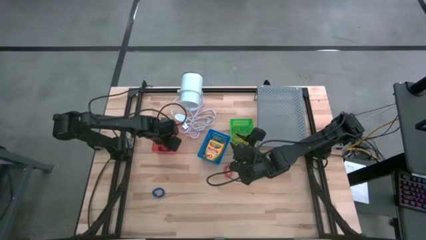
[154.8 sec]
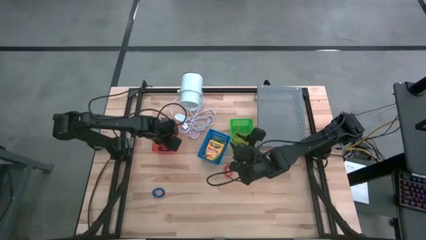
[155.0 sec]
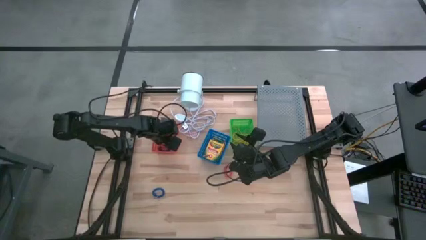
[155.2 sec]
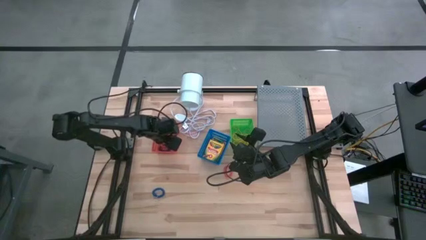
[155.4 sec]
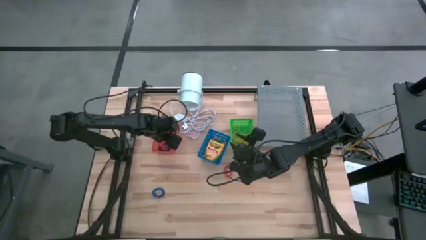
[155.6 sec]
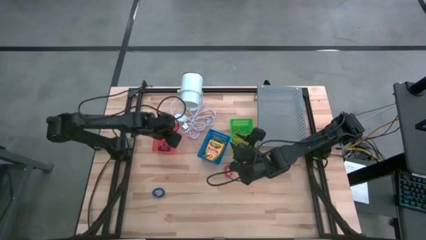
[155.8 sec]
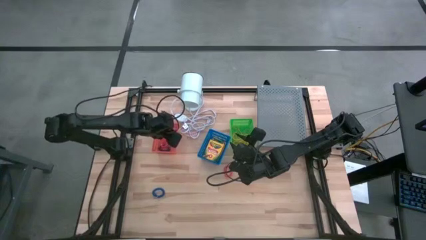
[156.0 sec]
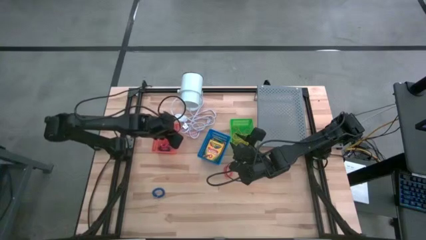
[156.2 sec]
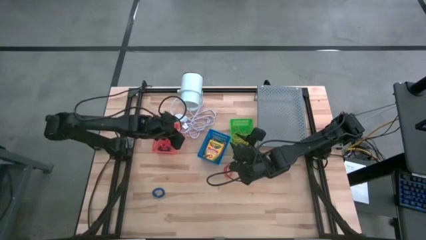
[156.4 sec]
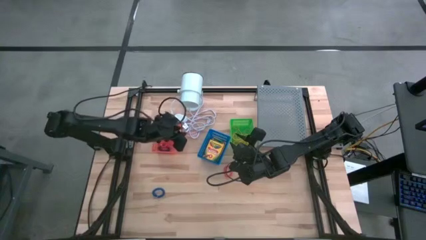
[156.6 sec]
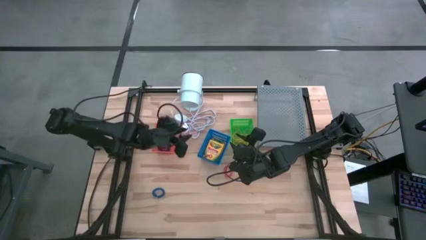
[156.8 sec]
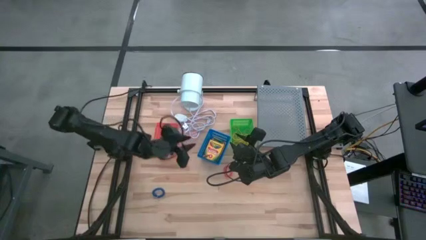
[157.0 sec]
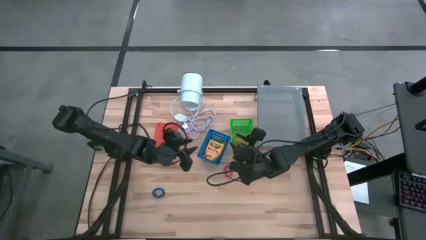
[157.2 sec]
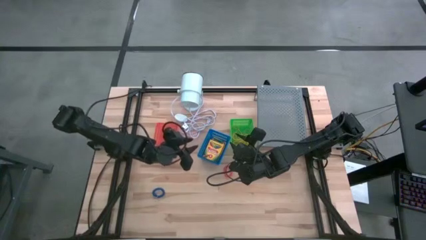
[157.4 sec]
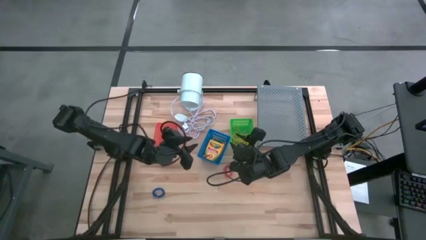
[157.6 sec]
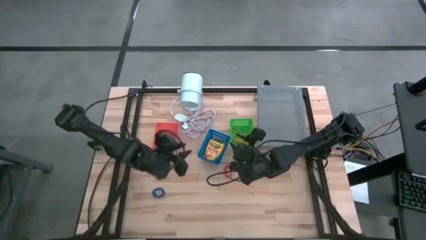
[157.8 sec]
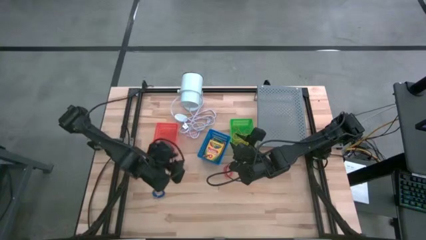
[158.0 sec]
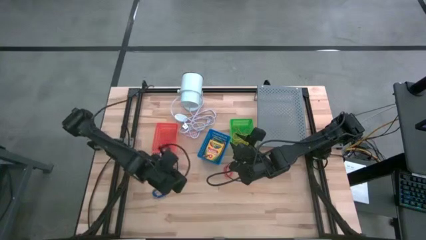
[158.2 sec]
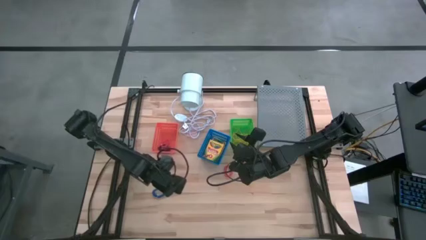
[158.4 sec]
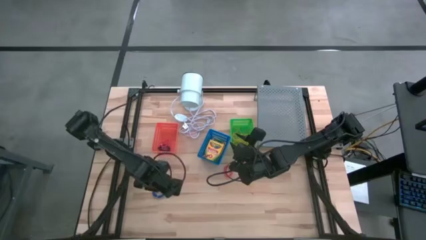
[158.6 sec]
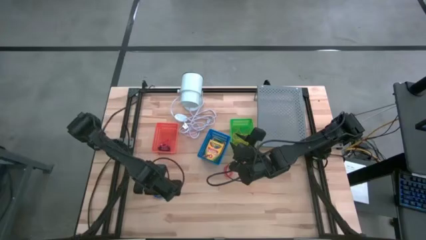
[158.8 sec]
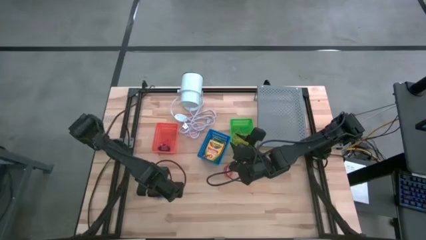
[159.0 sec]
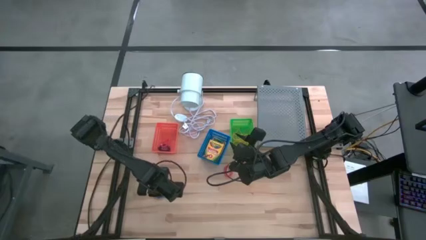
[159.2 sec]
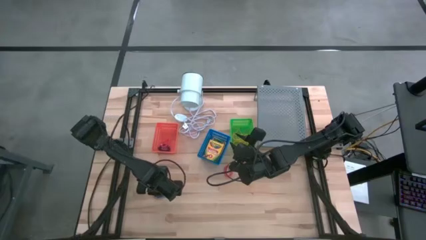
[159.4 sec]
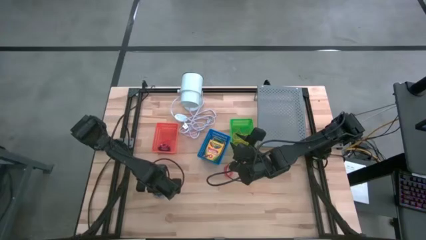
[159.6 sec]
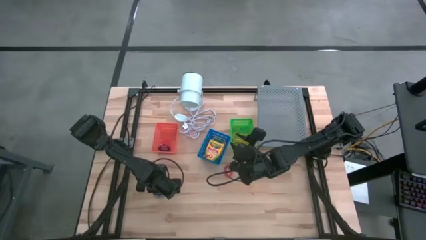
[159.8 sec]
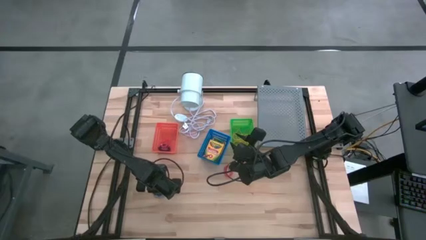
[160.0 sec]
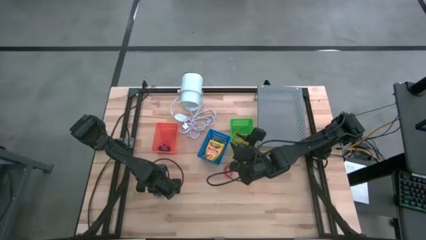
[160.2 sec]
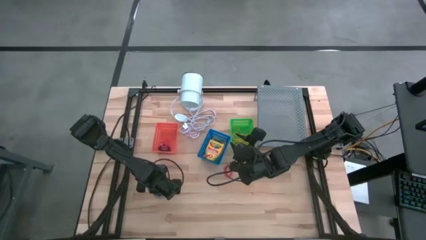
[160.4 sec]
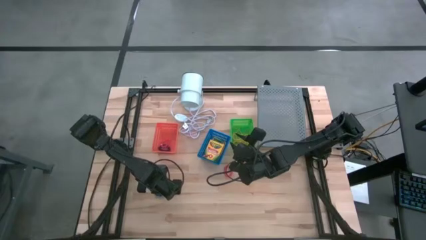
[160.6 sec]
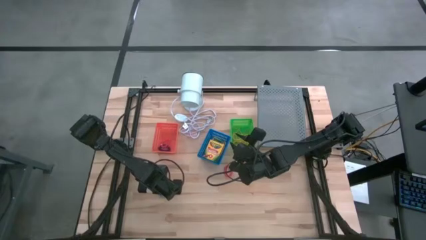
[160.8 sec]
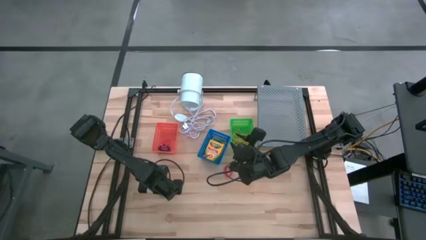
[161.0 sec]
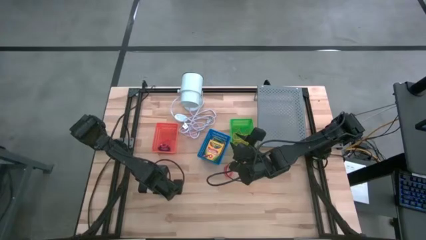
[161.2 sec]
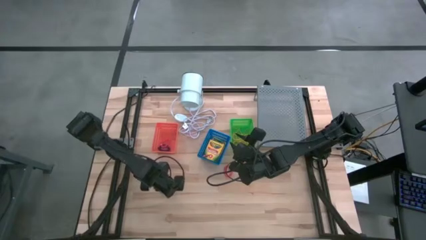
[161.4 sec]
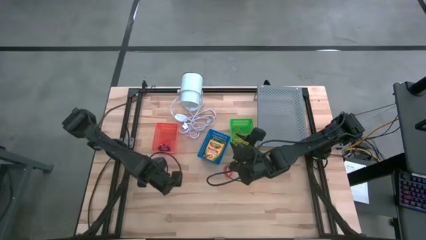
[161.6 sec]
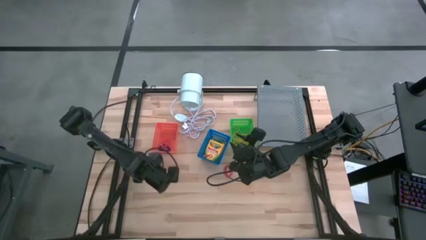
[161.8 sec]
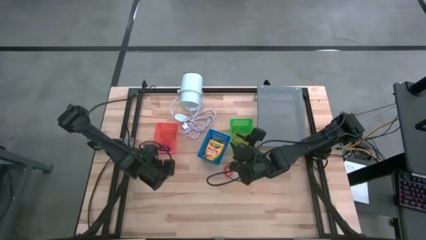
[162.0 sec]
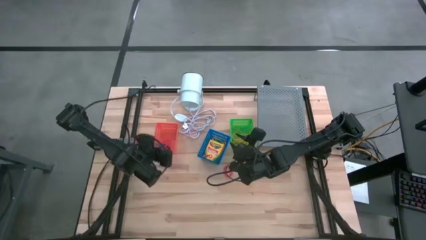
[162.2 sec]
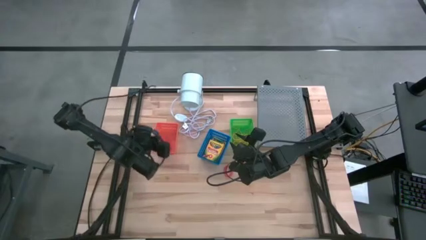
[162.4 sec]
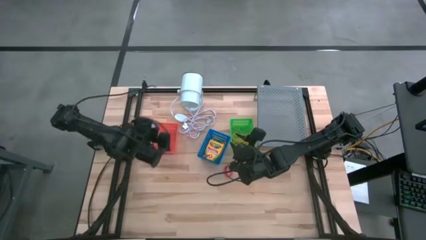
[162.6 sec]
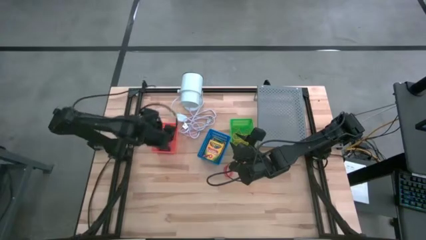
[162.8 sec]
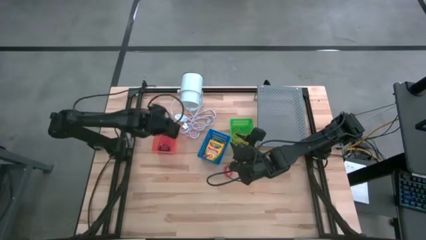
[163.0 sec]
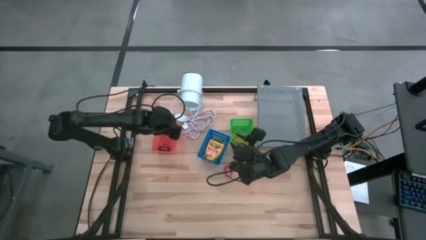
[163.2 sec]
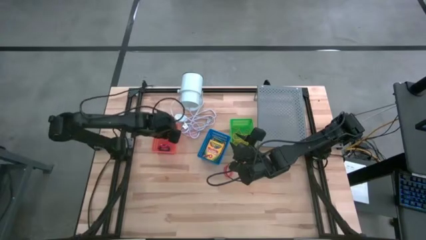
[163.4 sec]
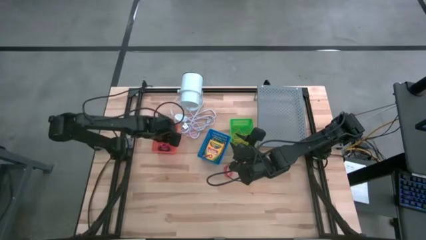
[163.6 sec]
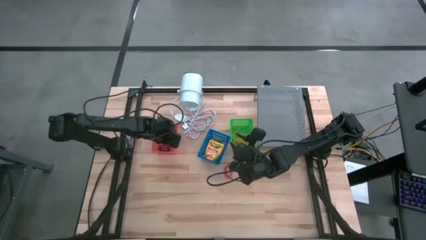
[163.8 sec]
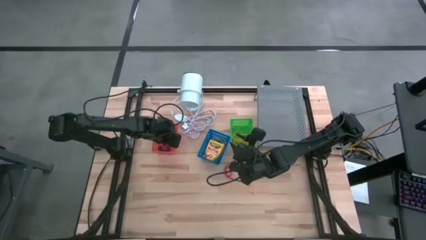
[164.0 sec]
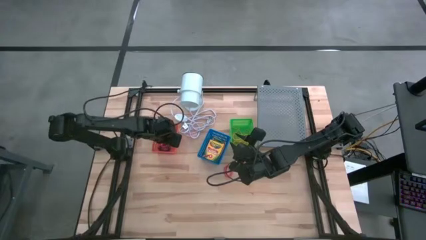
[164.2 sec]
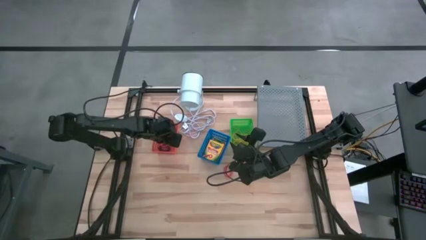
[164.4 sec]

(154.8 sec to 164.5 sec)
Task: Pick & Place Office Desk Supplies
Put the blue spring keychain into the orange bin
